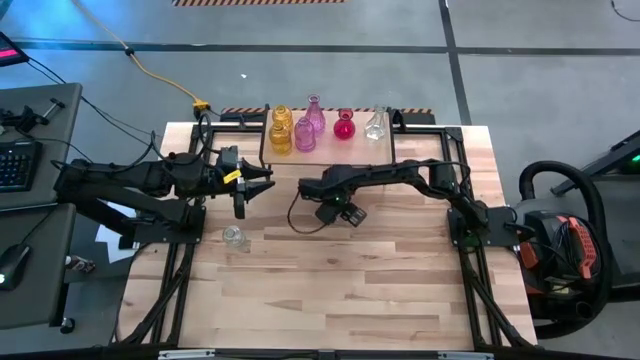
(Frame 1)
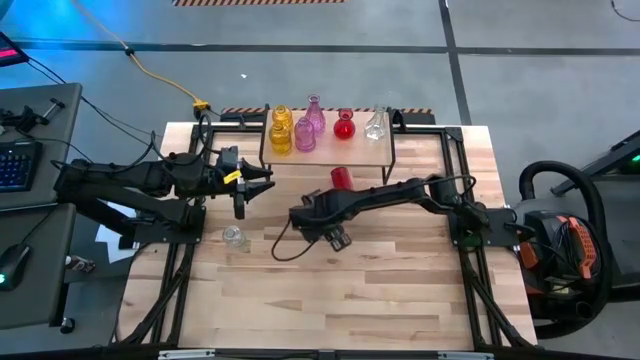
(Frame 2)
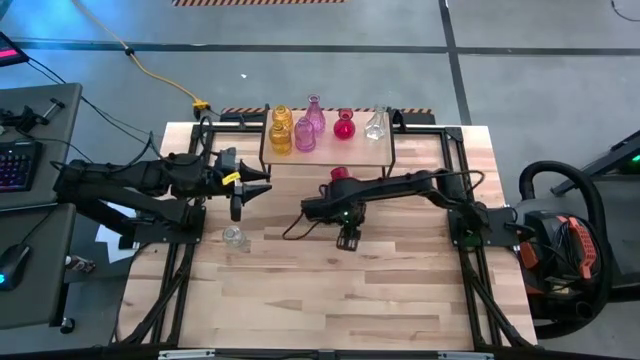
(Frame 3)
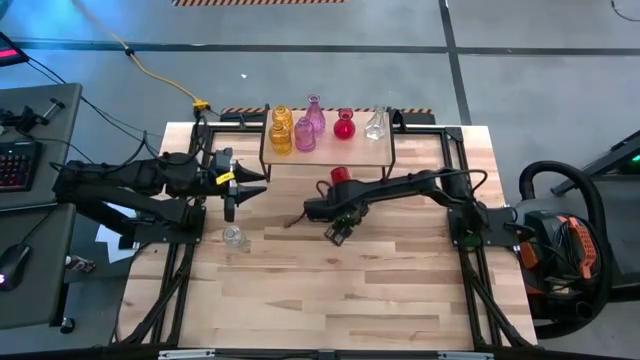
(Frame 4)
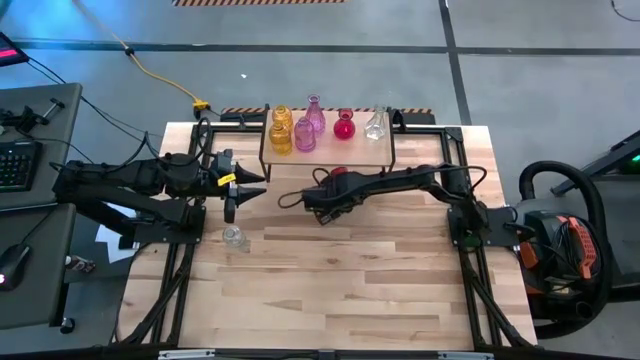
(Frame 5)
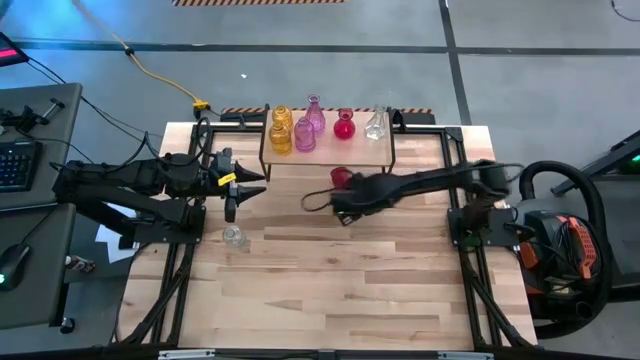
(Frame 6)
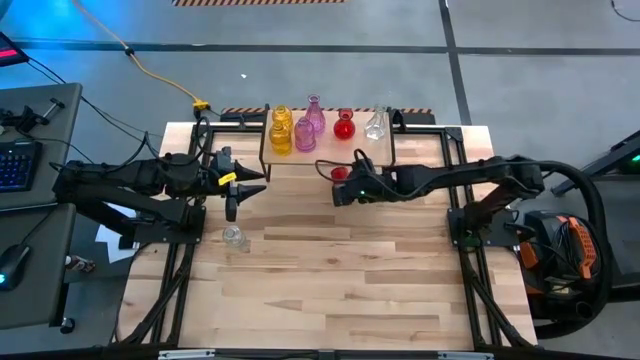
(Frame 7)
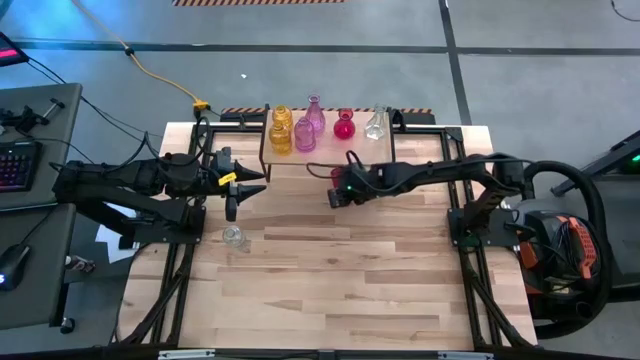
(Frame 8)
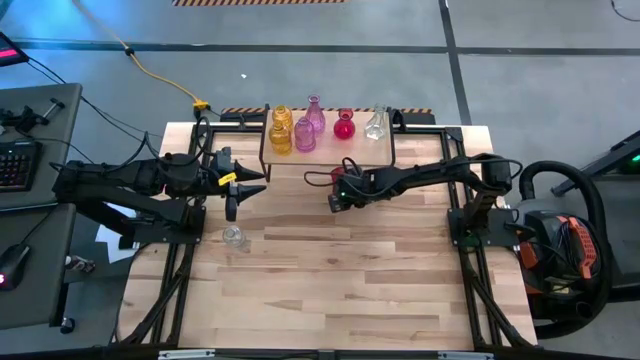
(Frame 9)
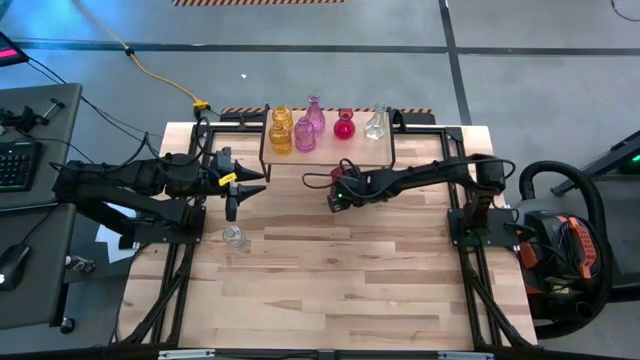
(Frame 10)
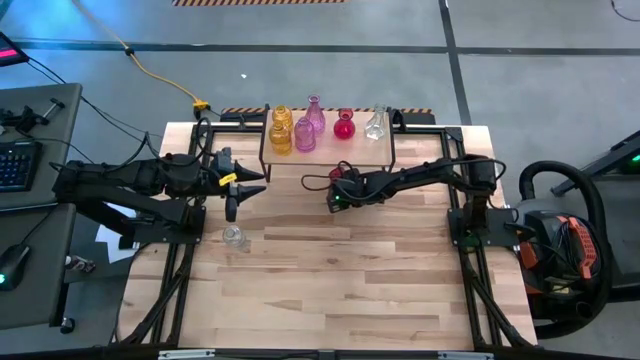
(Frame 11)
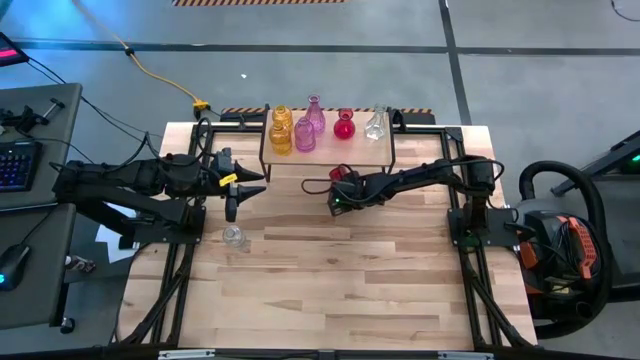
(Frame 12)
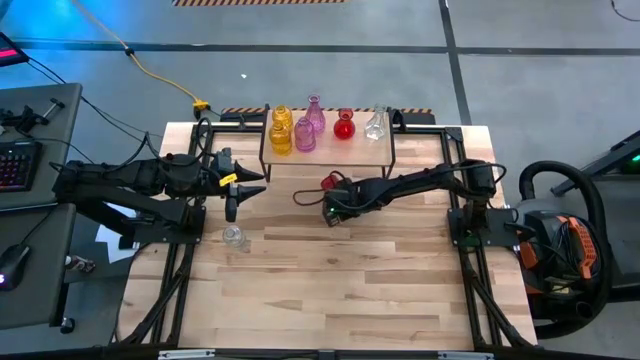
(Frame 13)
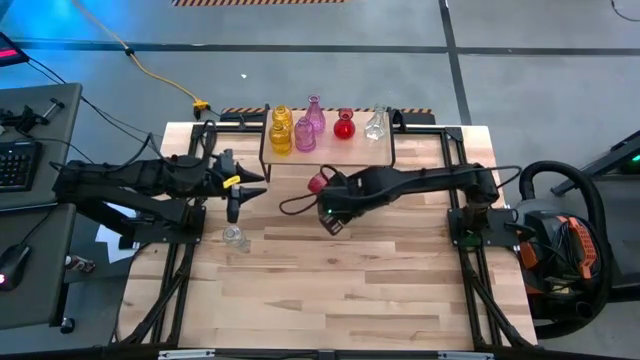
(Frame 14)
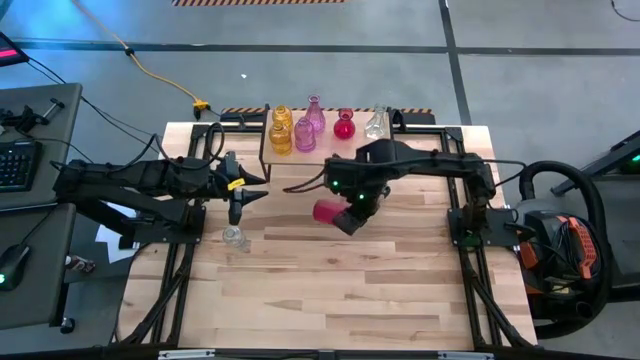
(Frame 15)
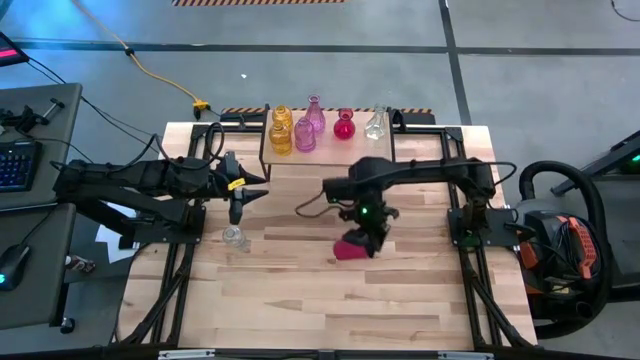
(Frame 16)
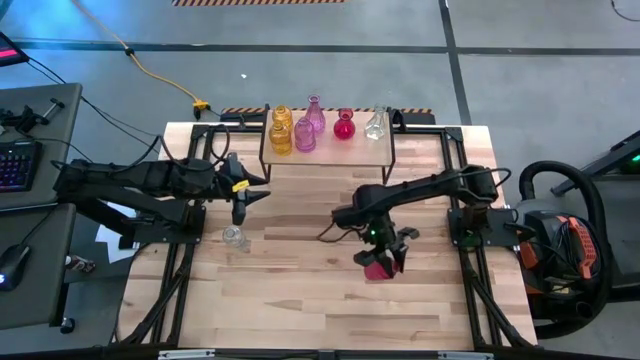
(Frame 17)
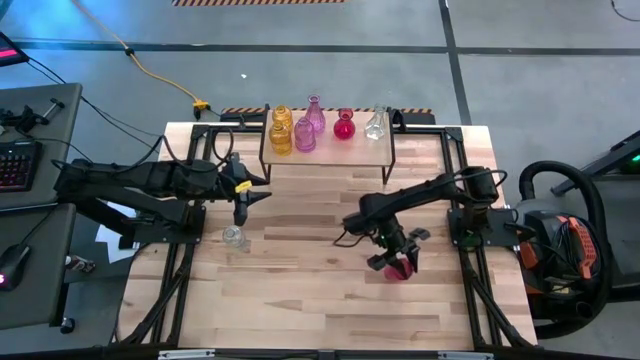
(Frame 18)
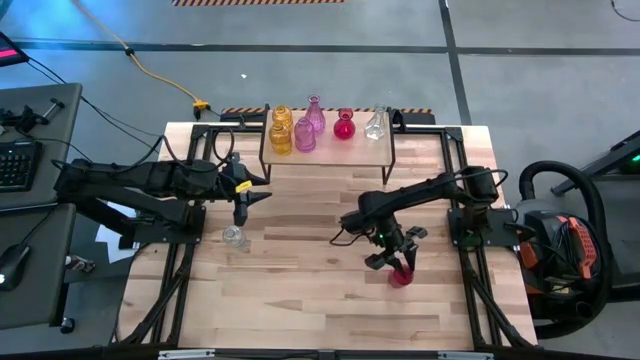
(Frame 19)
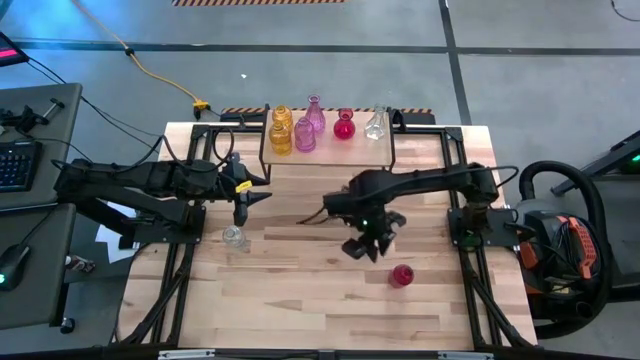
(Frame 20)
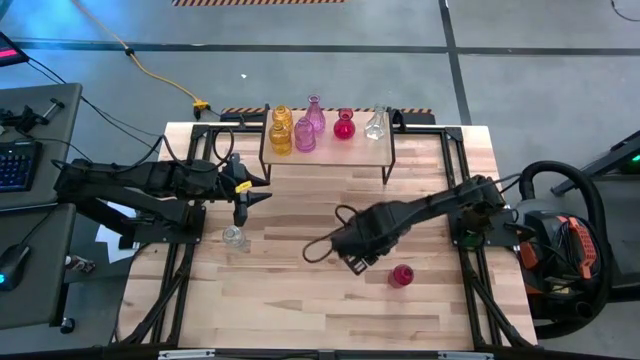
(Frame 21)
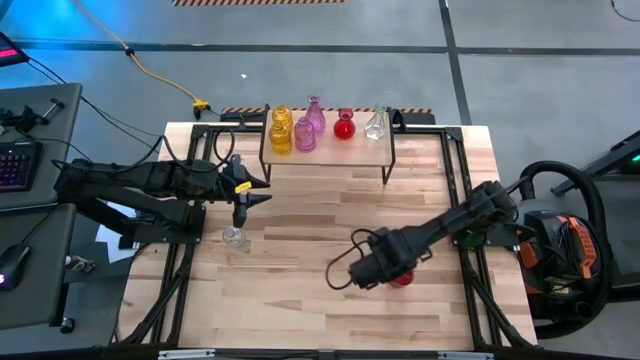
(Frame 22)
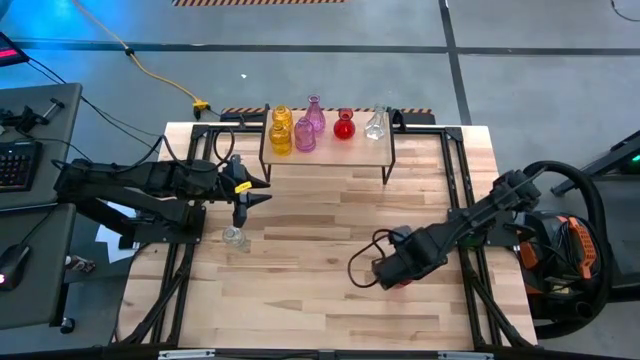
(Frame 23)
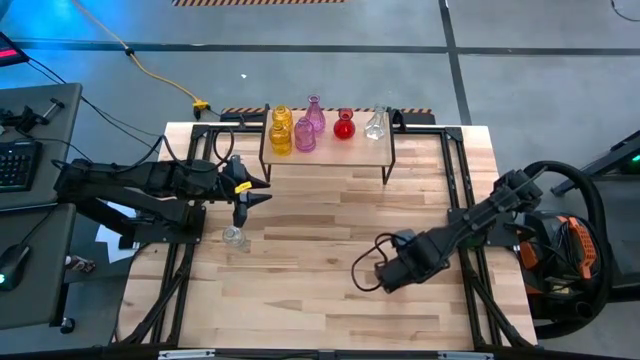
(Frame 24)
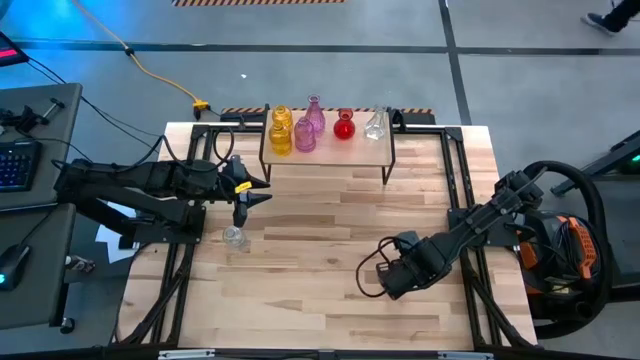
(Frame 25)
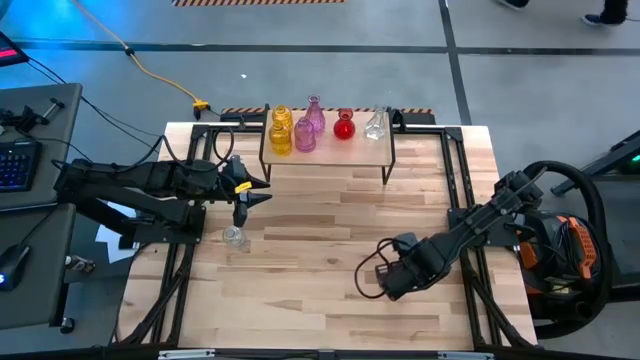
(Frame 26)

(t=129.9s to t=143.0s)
Task: sort vases onto shelf
Put the red vase on the shelf

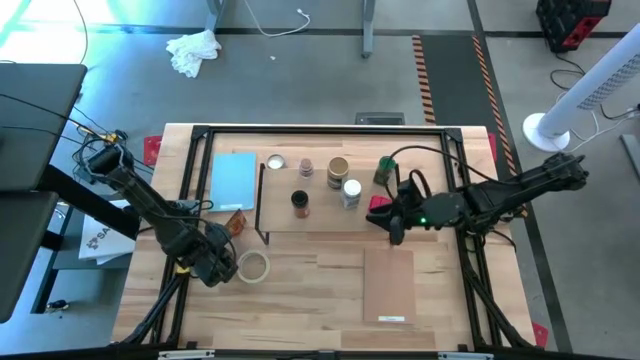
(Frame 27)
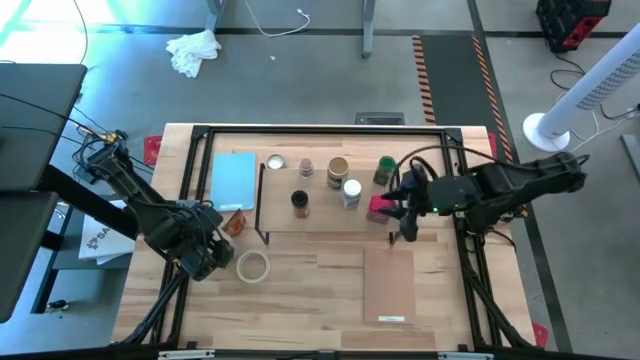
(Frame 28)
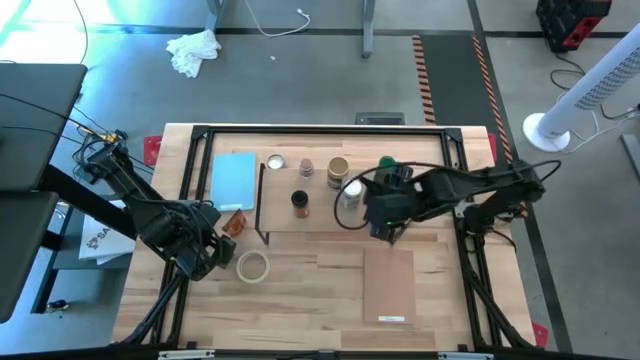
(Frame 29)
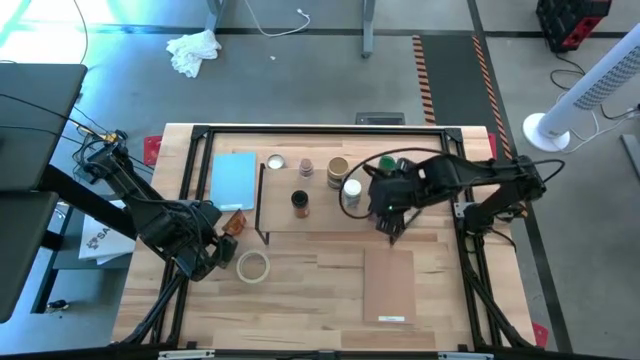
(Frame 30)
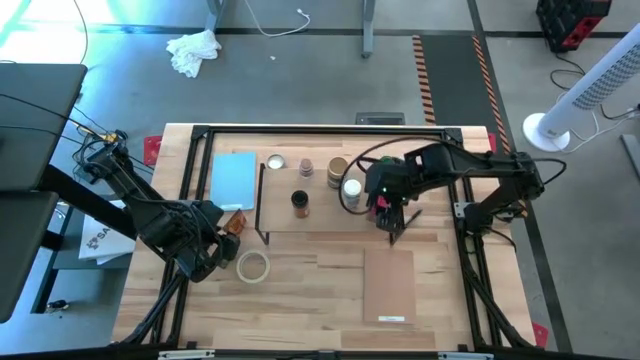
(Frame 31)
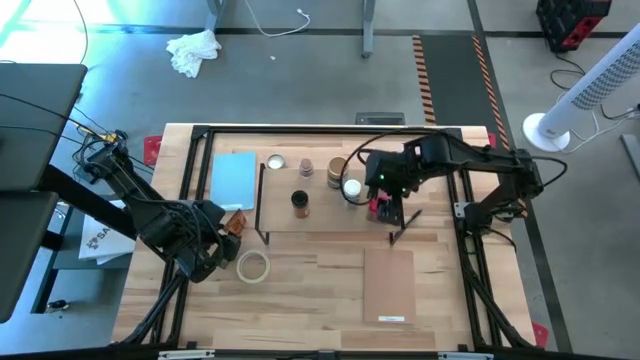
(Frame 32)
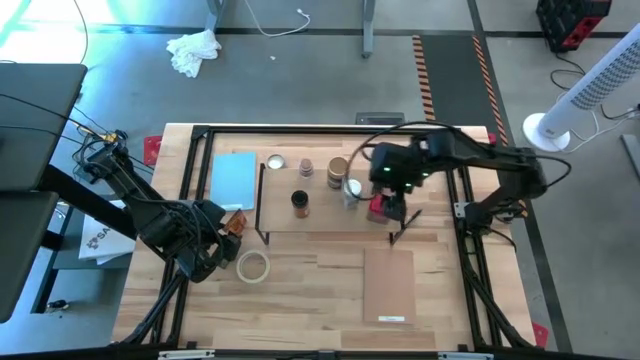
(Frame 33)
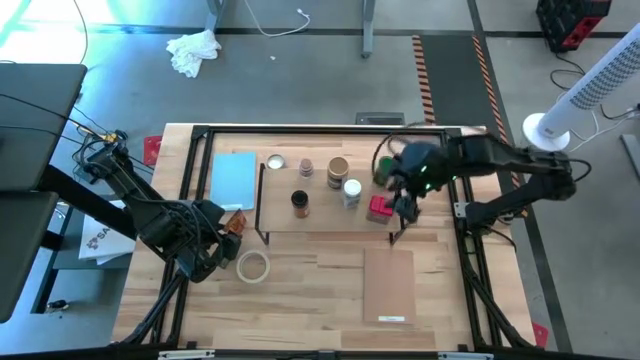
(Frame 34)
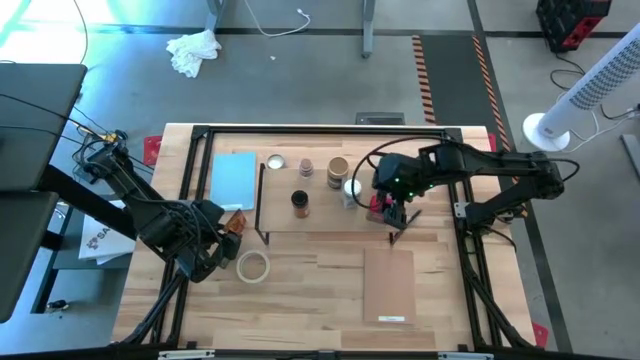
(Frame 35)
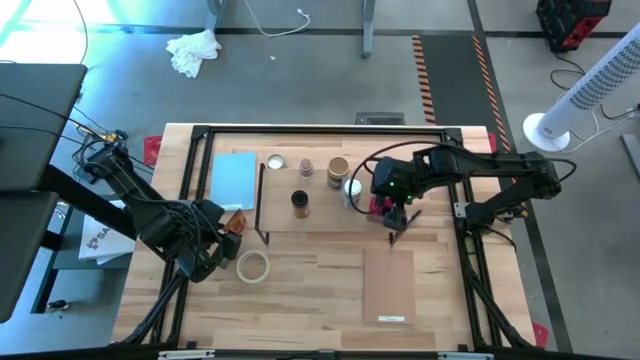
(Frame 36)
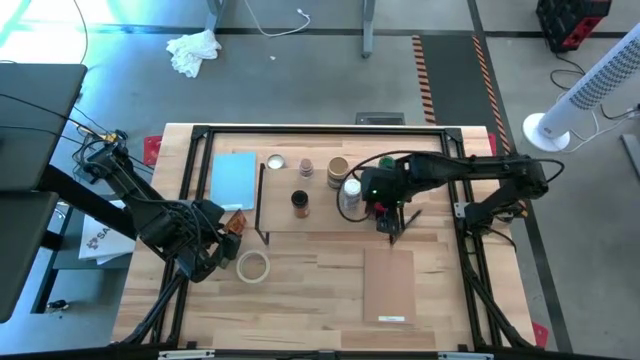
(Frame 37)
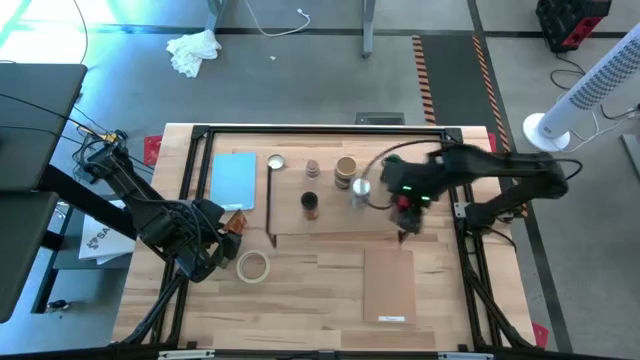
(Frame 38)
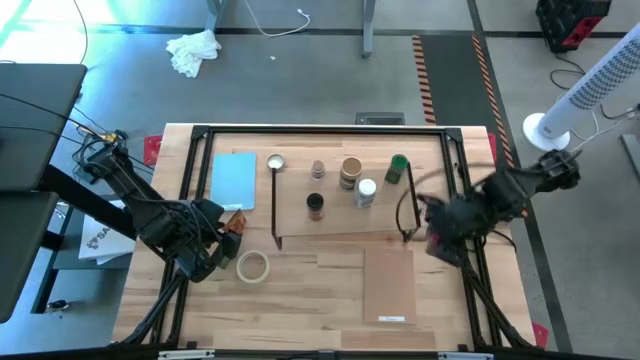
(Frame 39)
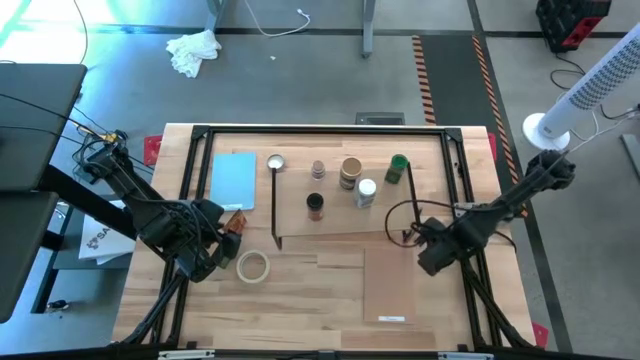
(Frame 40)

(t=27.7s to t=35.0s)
Task: Shelf spices
Remove the red seasoning can from the shelf
